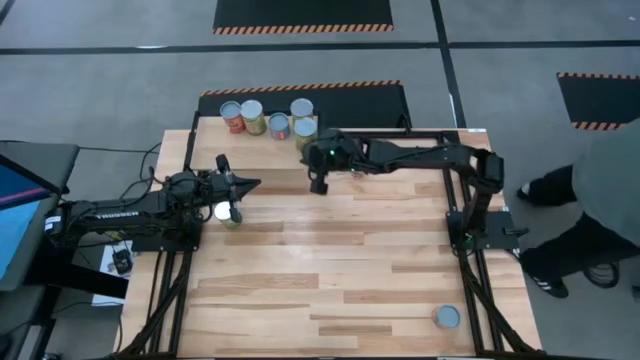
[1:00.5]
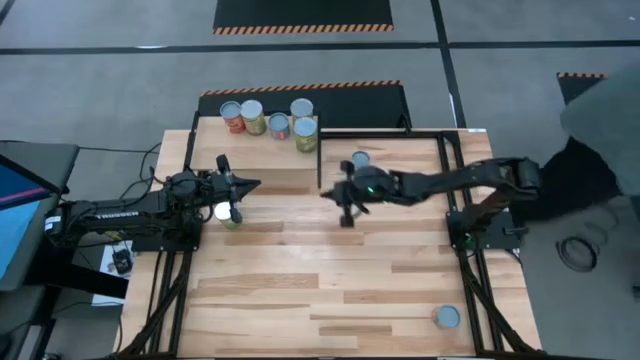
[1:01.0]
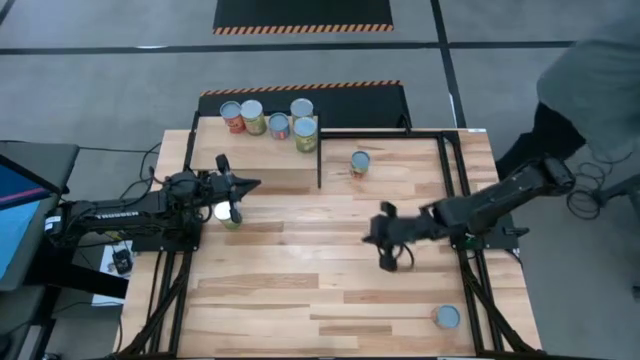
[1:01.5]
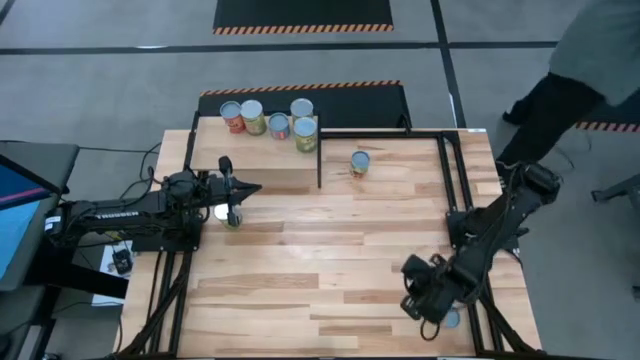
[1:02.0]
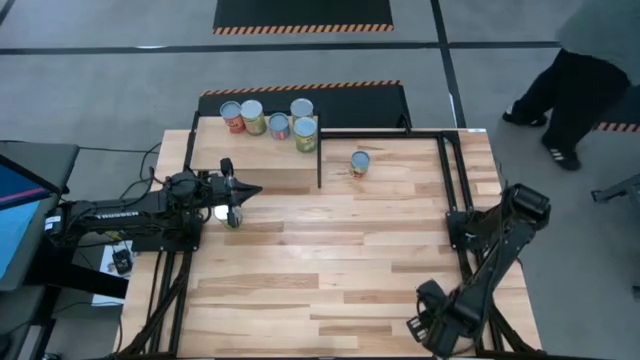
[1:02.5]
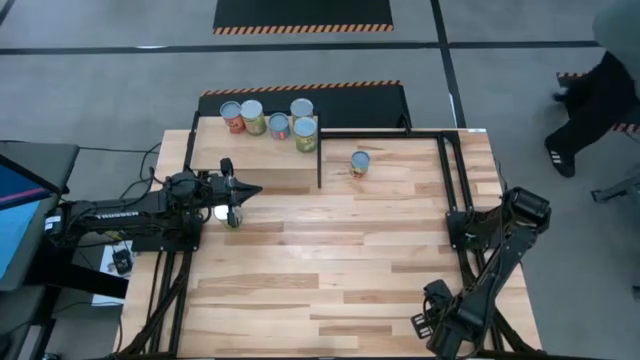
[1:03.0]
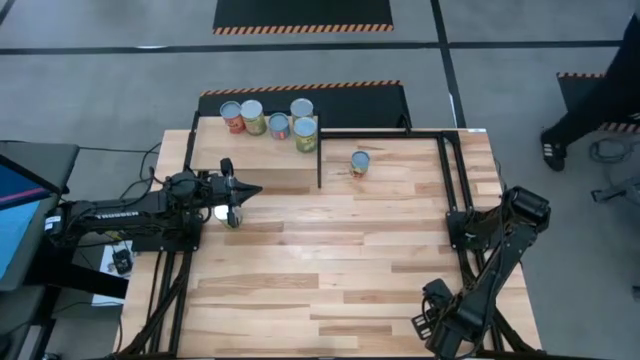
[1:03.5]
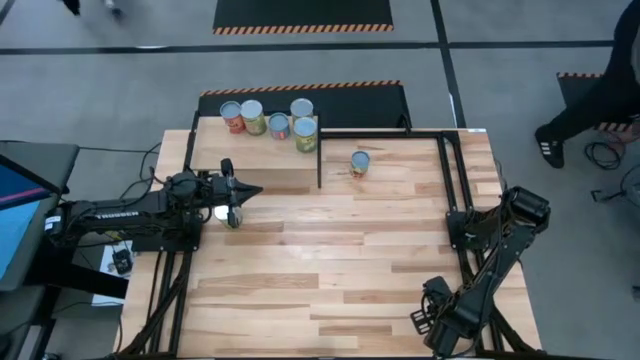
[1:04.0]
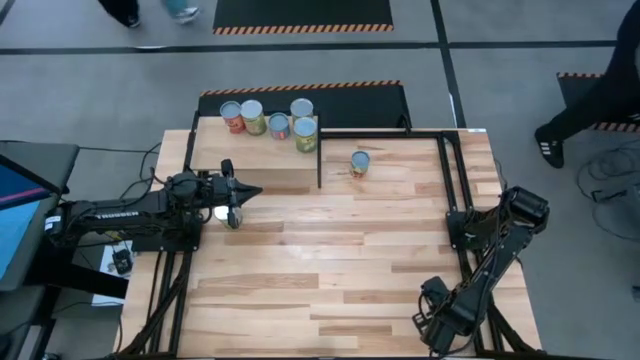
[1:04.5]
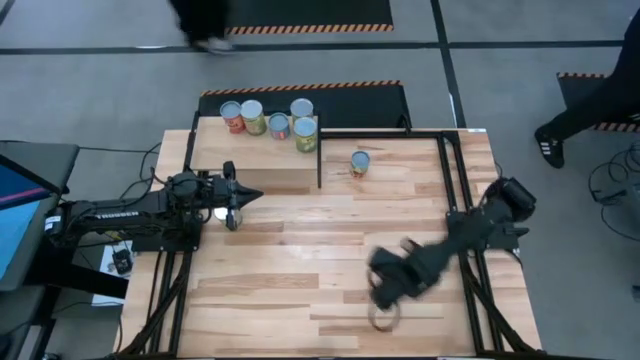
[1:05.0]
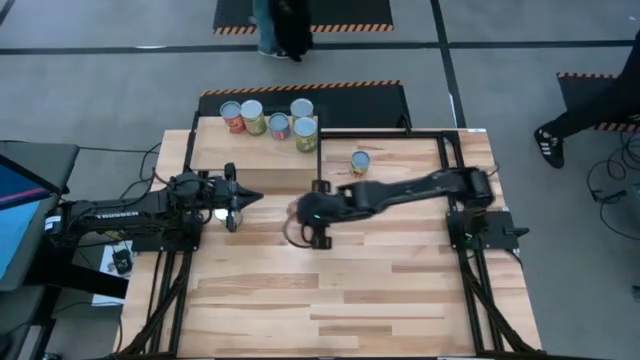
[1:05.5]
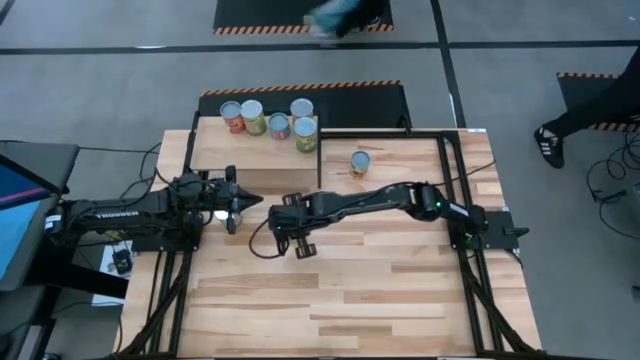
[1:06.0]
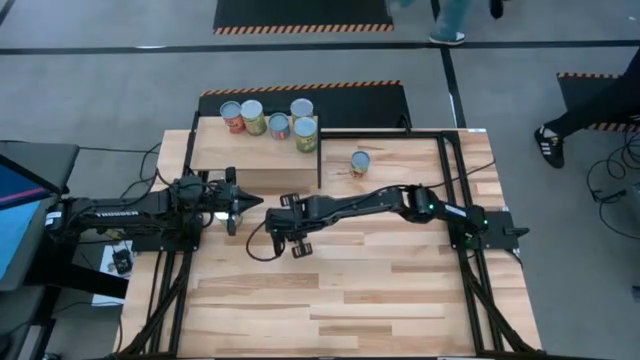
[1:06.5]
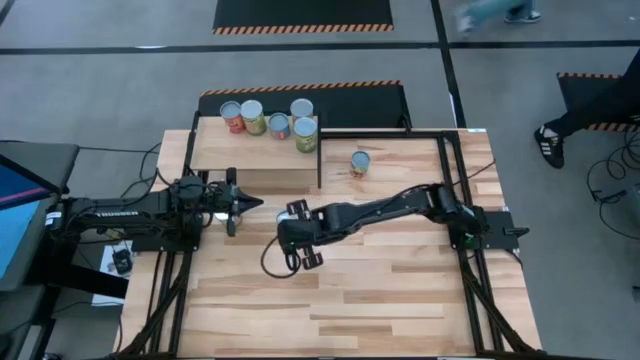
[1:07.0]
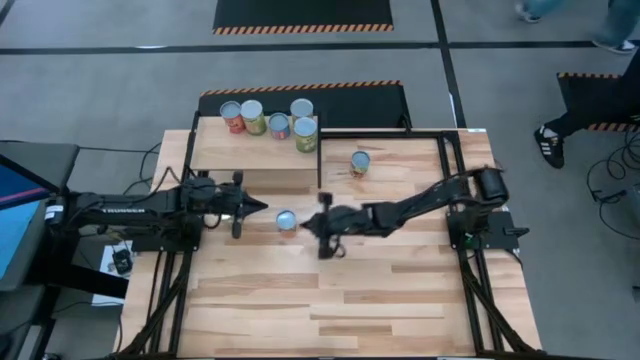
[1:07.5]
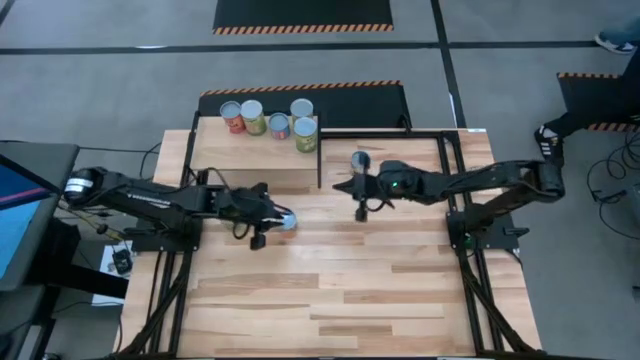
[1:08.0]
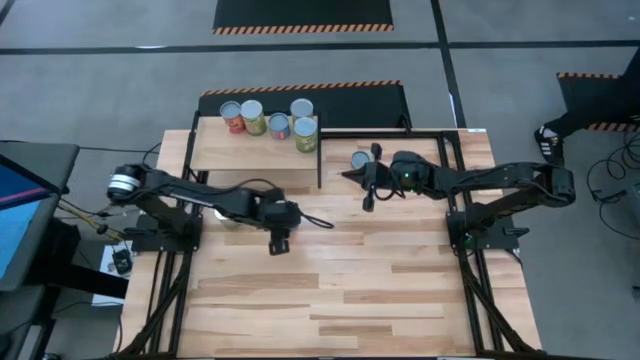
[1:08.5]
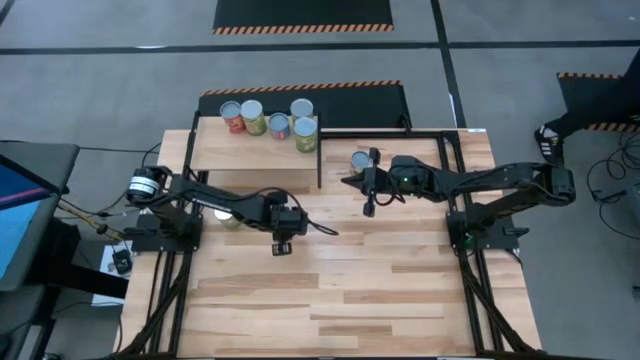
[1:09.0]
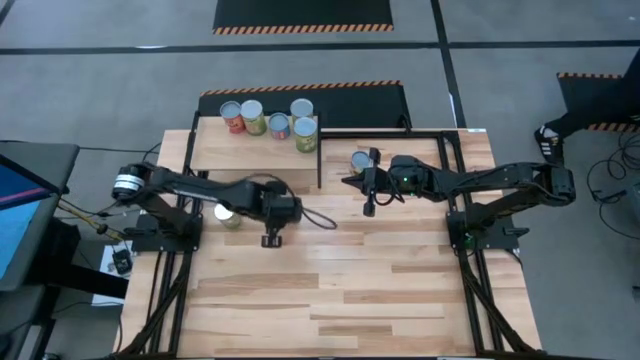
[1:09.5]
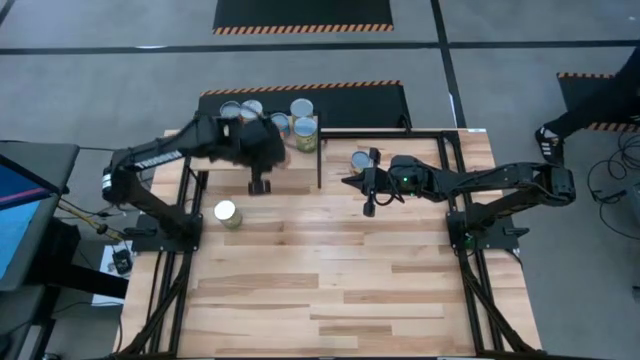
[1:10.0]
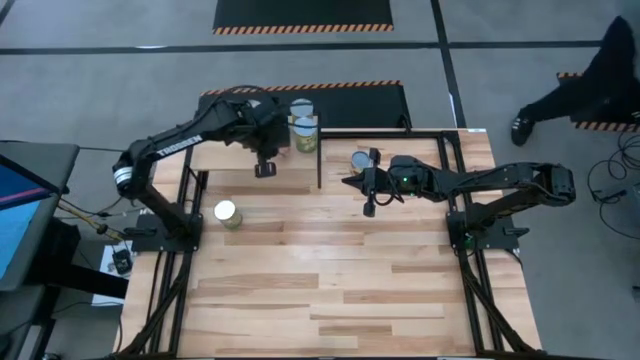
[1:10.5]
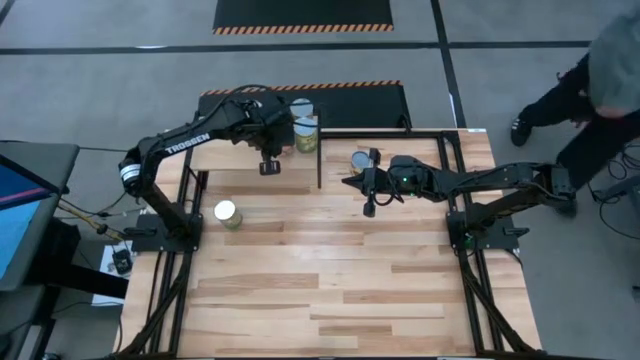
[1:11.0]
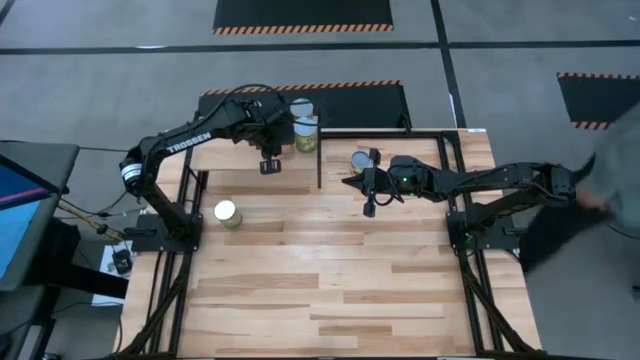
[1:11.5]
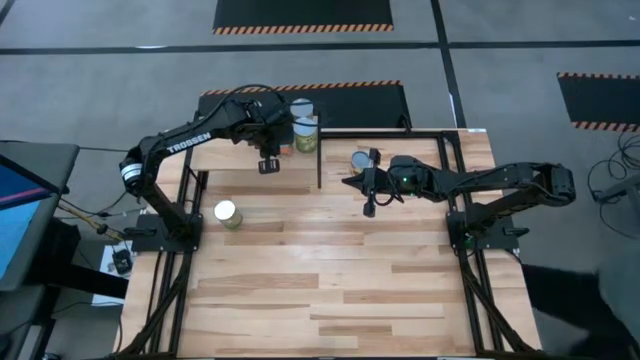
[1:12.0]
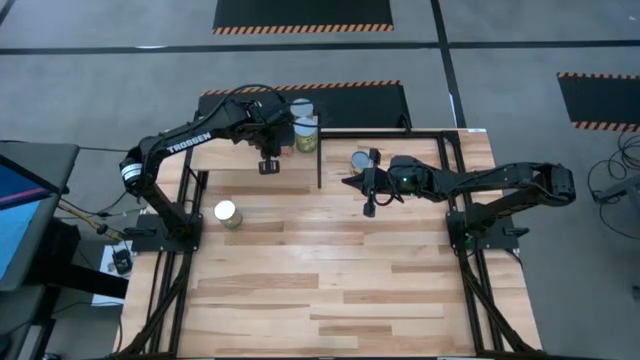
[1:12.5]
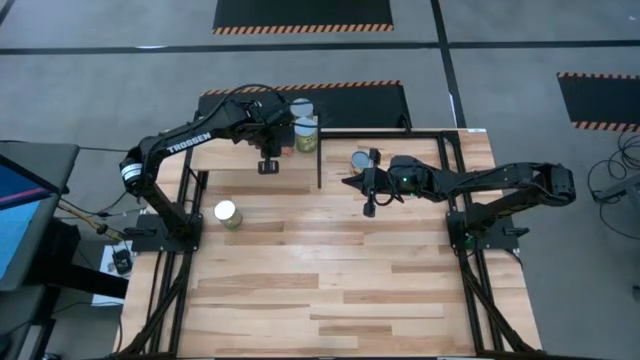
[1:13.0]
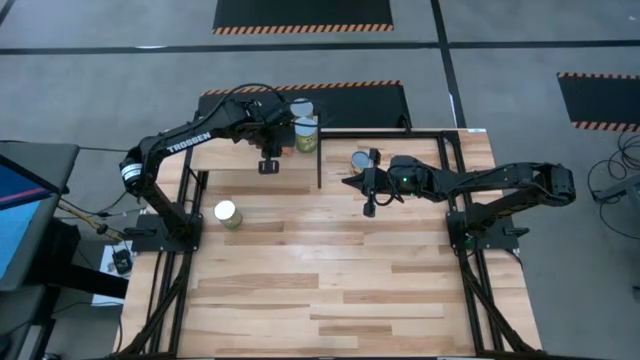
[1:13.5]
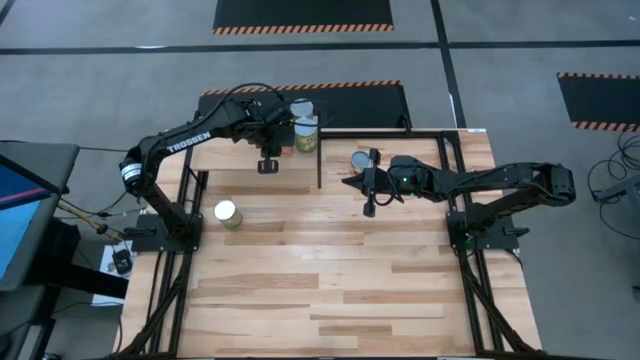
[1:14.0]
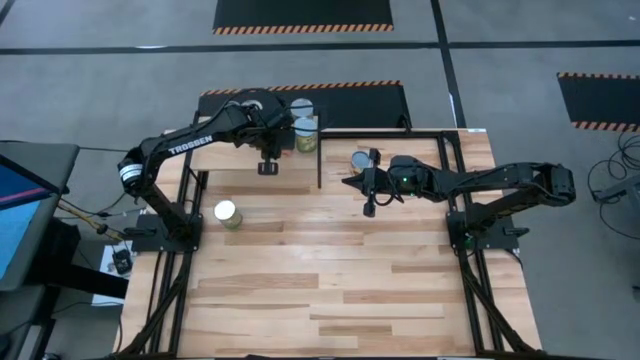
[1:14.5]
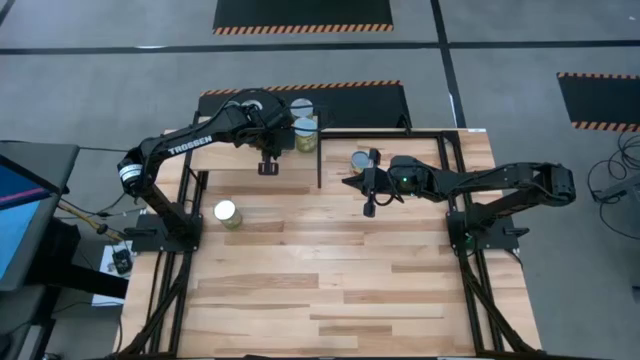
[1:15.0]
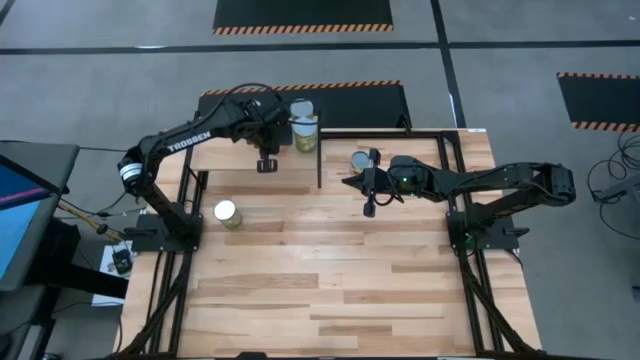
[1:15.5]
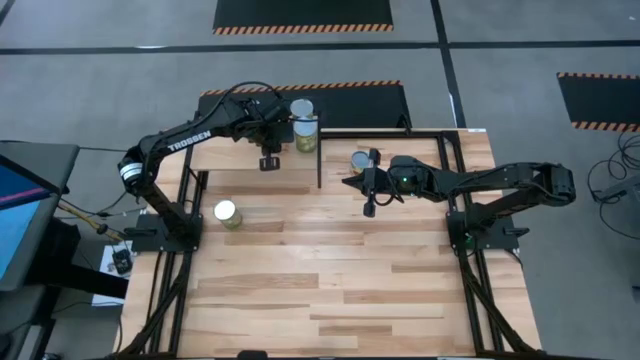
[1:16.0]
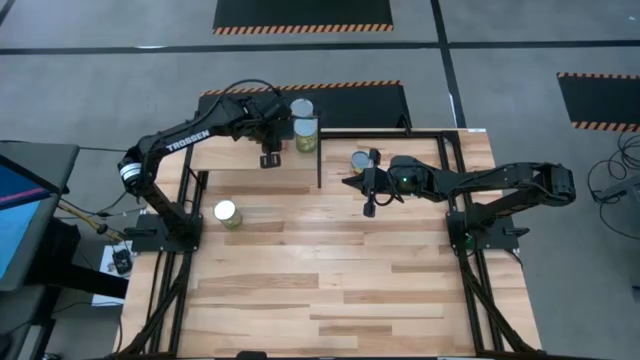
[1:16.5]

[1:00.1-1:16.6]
Task: Pick and place cans onto a shelf
Put the bottom canned orange on the shelf

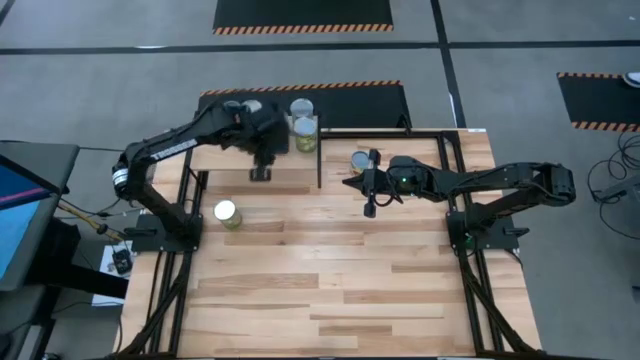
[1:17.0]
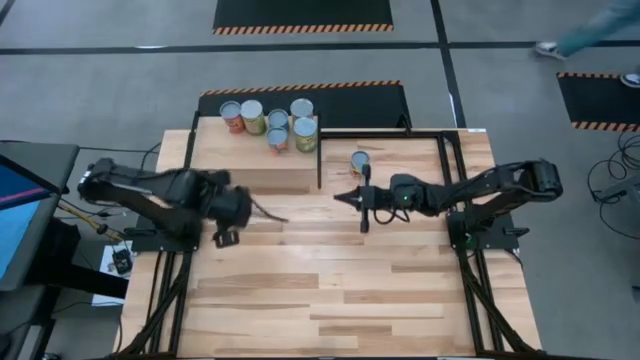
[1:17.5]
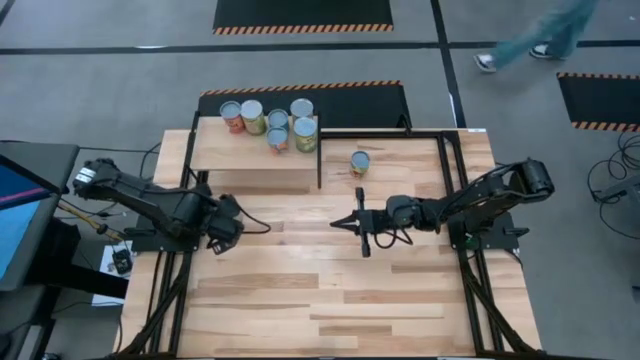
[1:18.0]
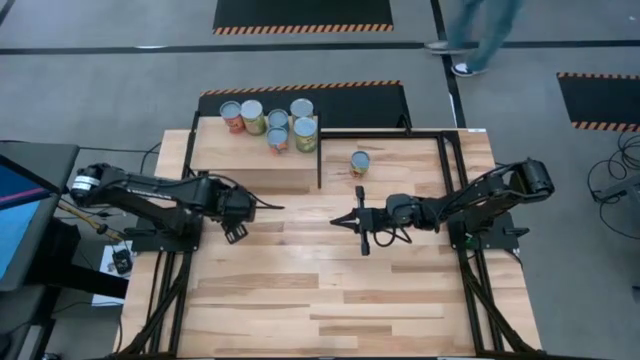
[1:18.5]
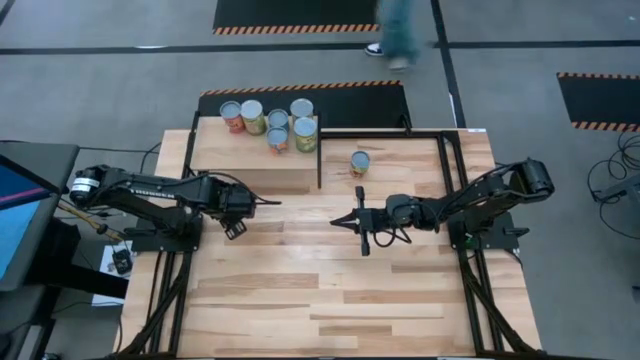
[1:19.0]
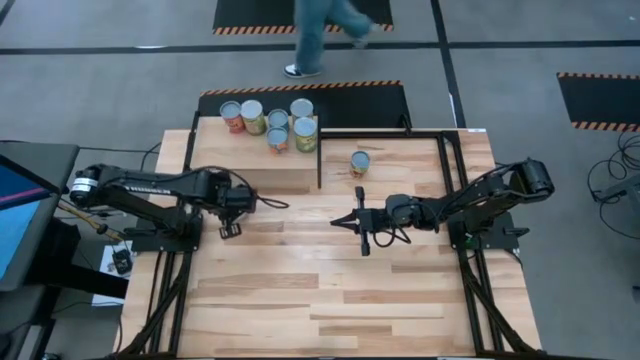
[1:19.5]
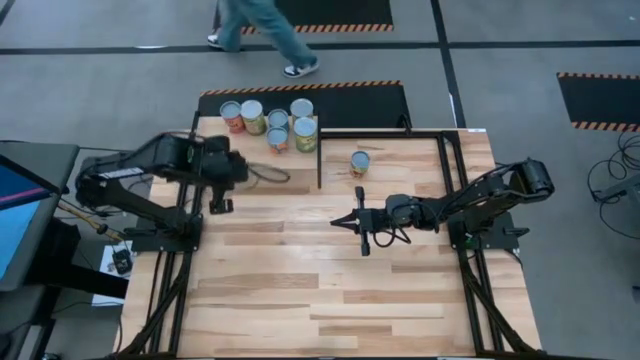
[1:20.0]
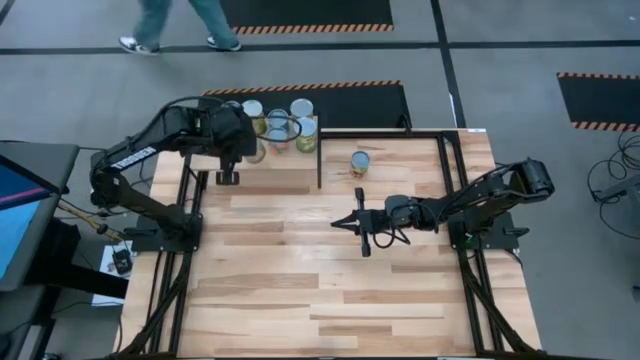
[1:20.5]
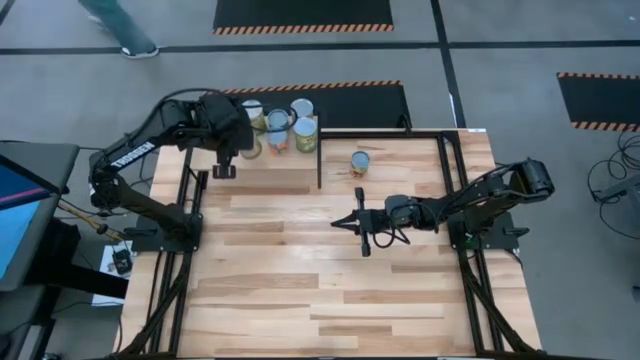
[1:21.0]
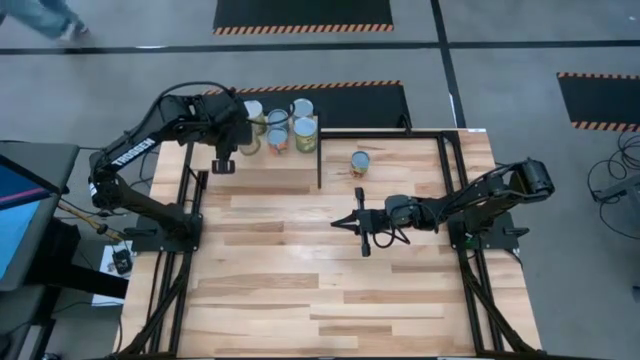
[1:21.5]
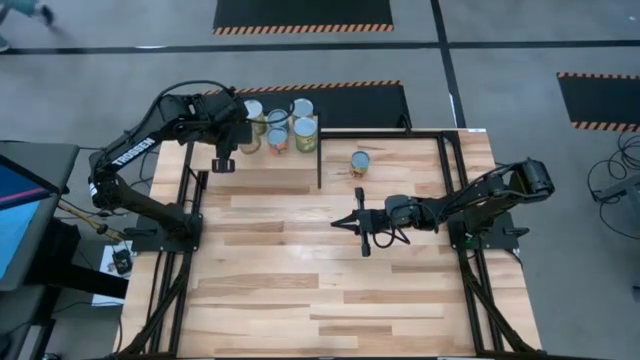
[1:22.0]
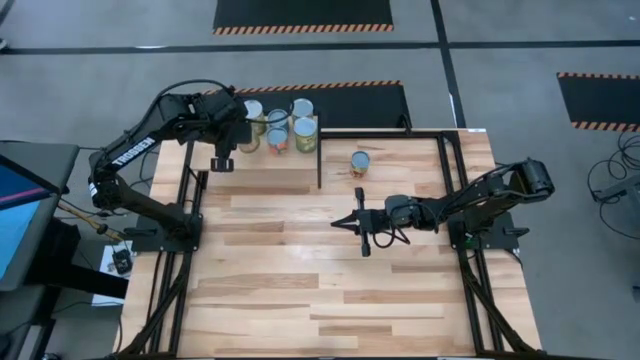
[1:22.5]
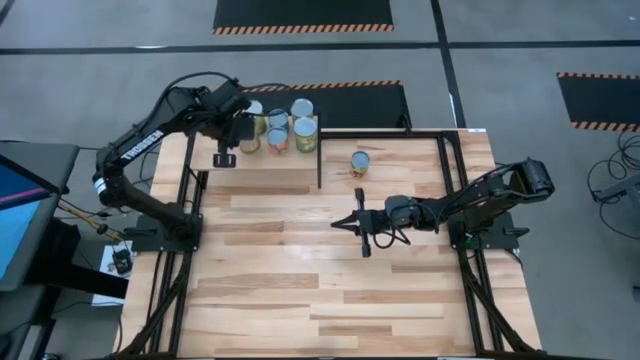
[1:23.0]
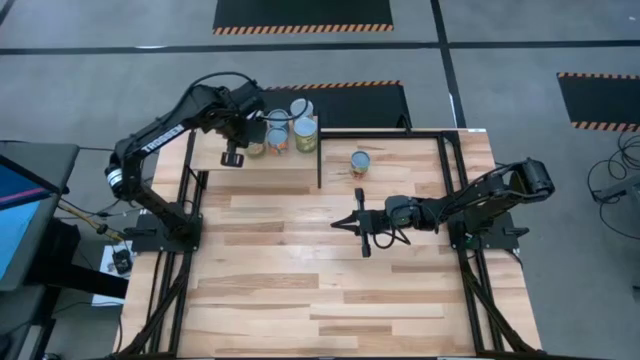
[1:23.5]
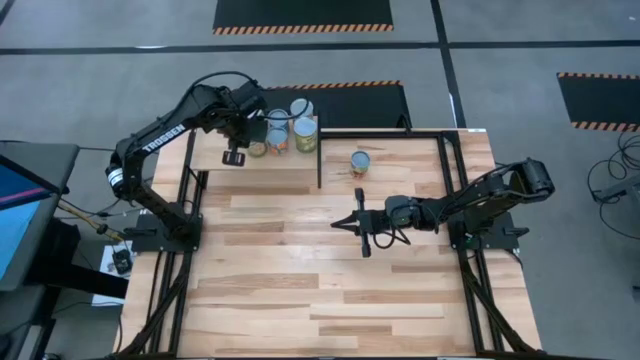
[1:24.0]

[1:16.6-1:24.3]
Put the canned oranges on the shelf
